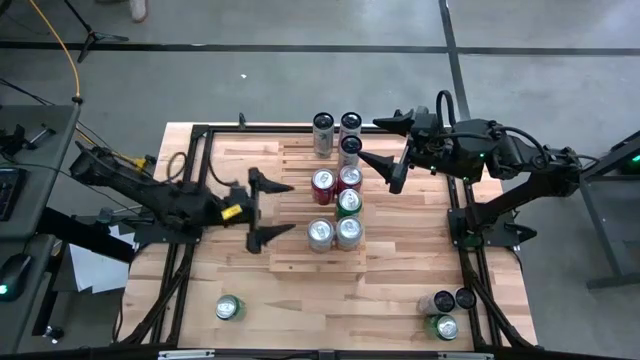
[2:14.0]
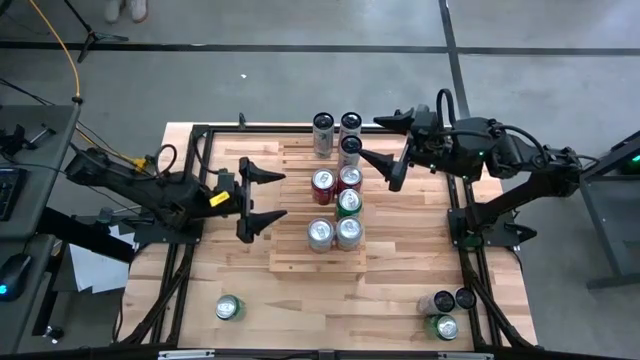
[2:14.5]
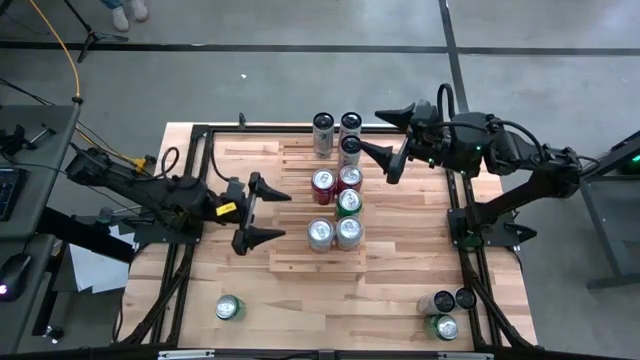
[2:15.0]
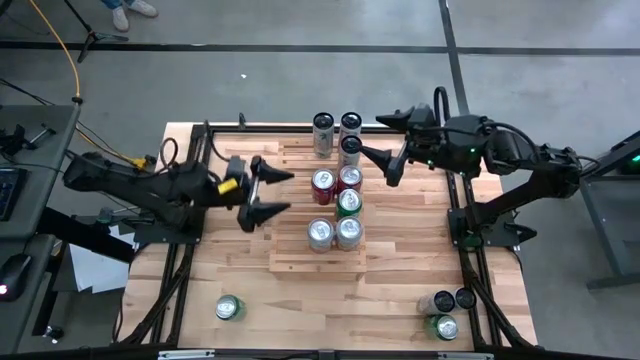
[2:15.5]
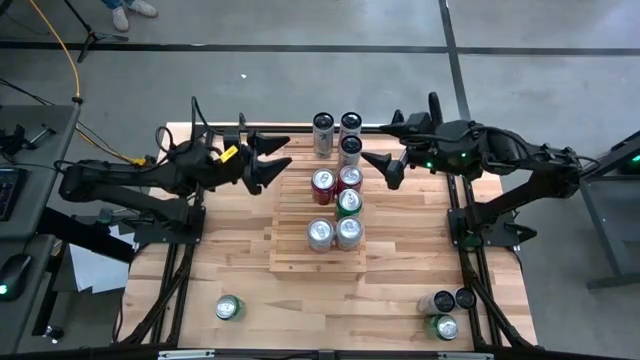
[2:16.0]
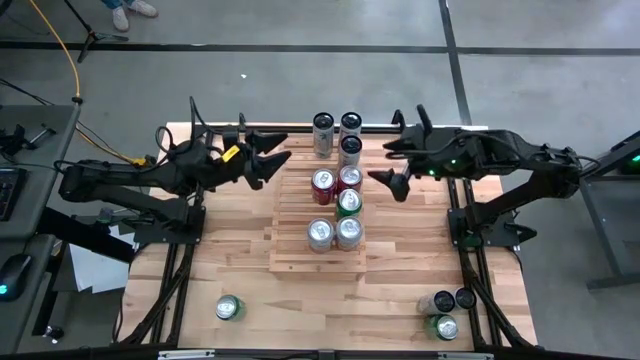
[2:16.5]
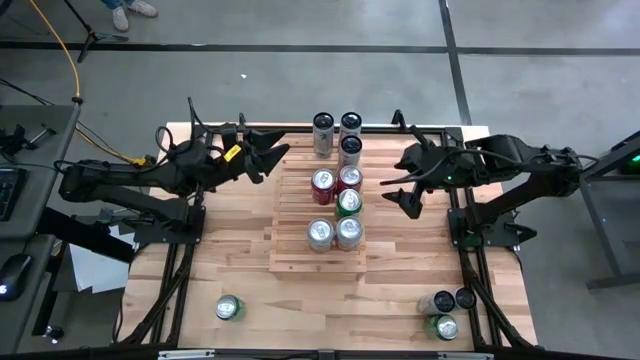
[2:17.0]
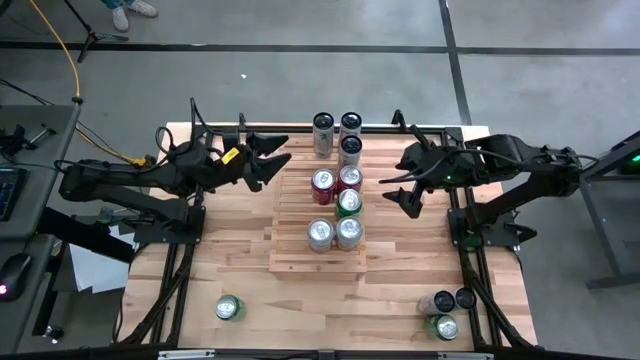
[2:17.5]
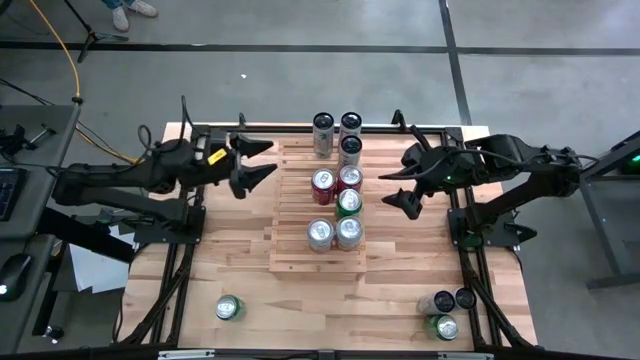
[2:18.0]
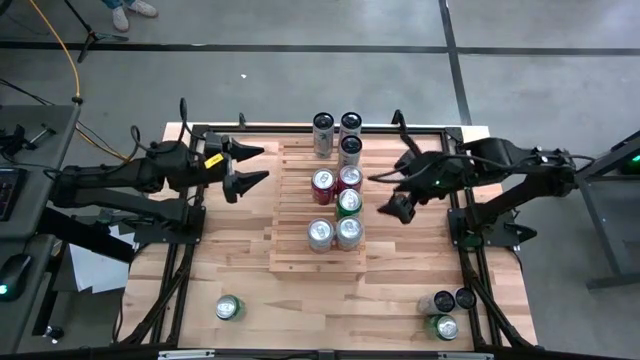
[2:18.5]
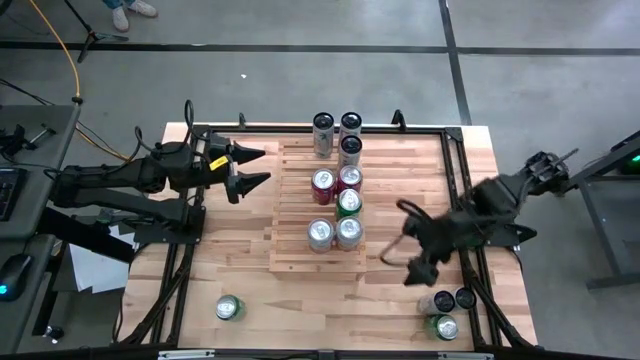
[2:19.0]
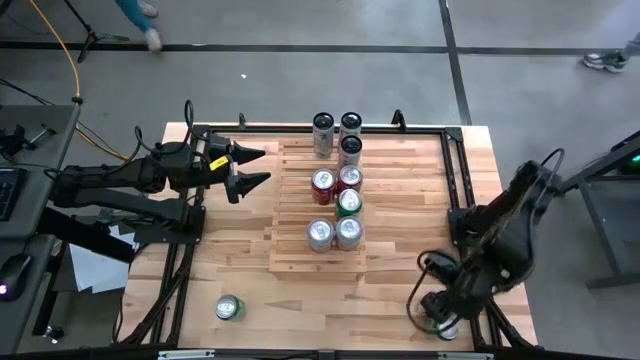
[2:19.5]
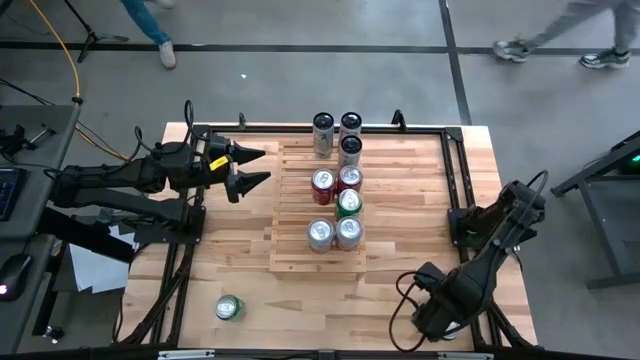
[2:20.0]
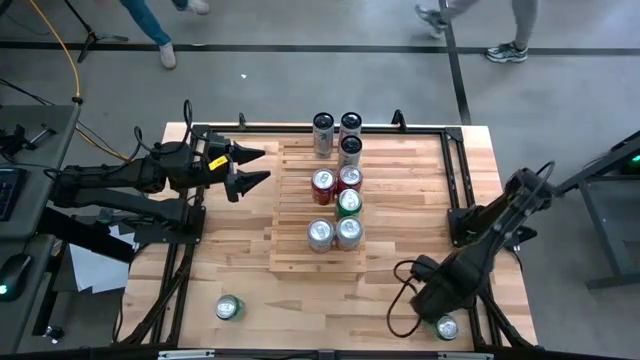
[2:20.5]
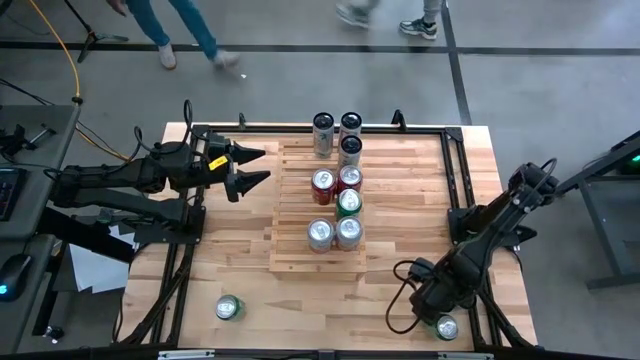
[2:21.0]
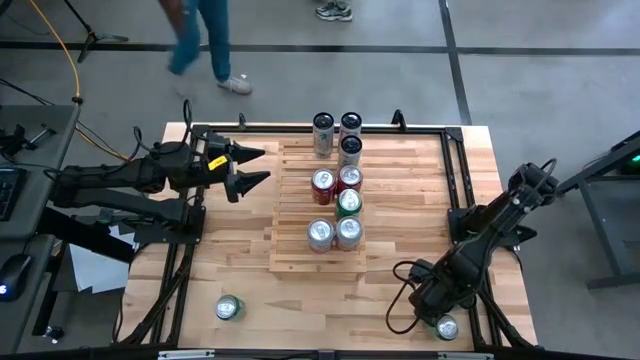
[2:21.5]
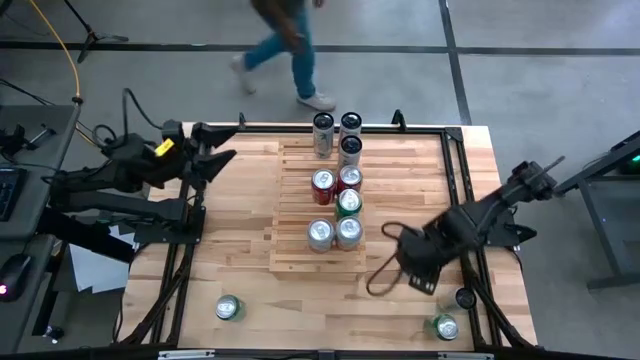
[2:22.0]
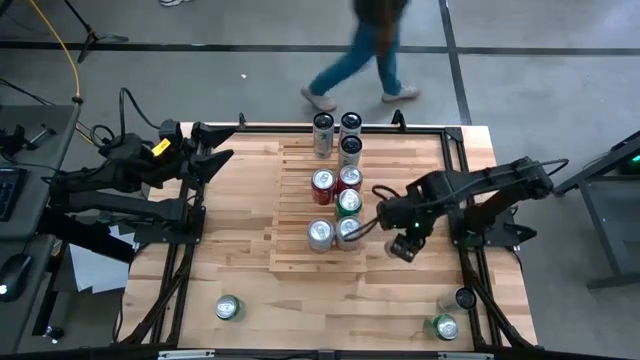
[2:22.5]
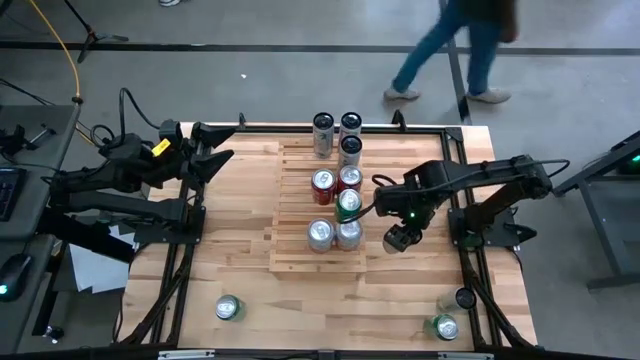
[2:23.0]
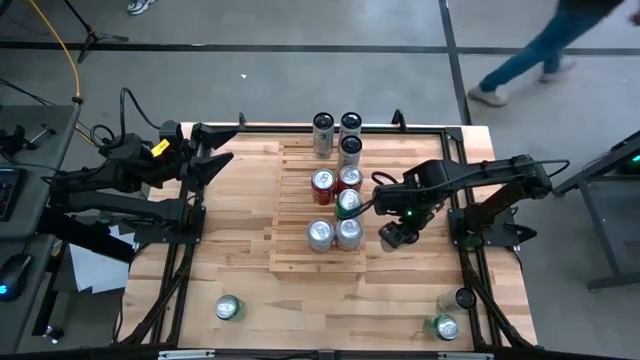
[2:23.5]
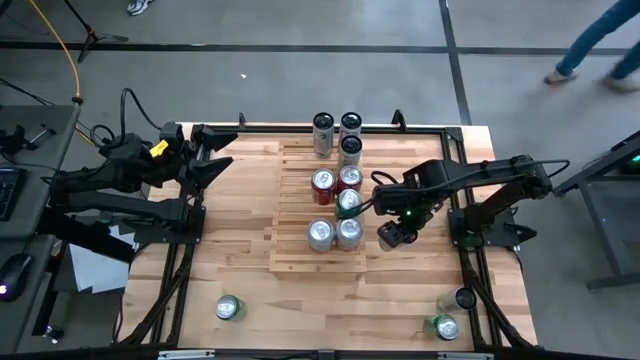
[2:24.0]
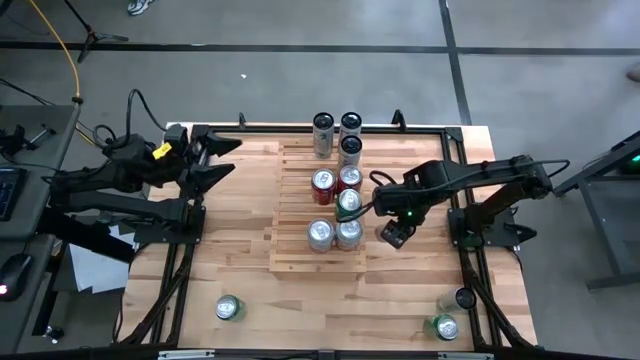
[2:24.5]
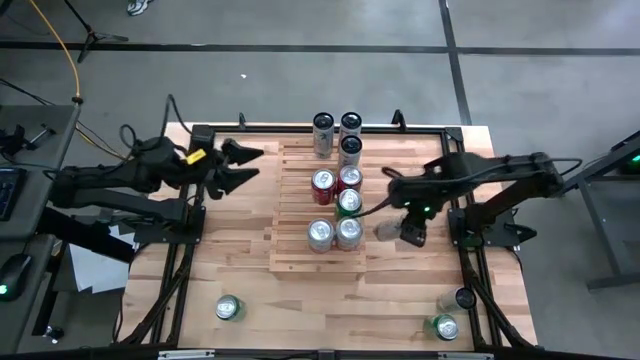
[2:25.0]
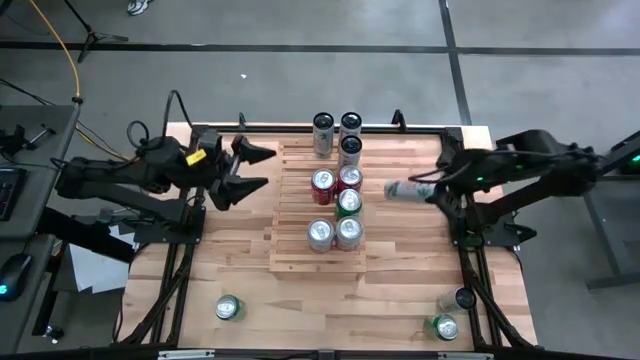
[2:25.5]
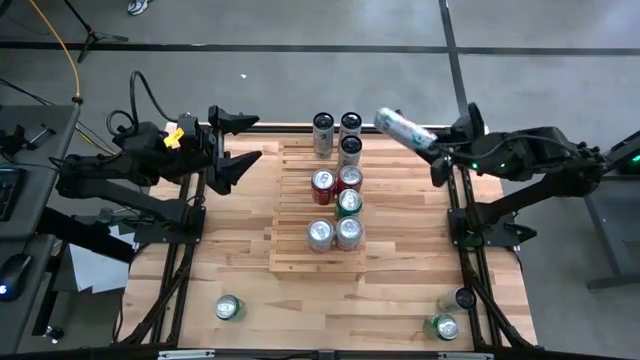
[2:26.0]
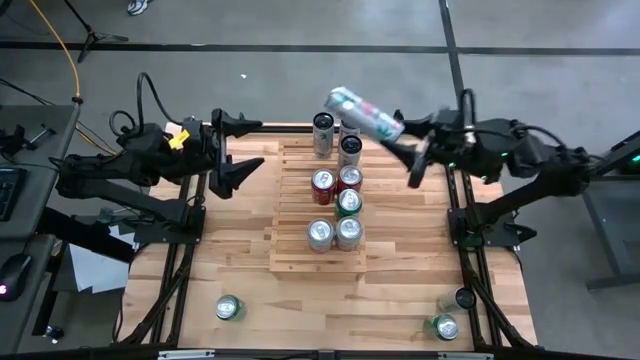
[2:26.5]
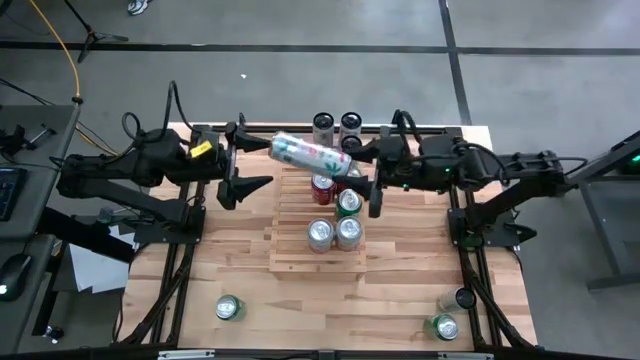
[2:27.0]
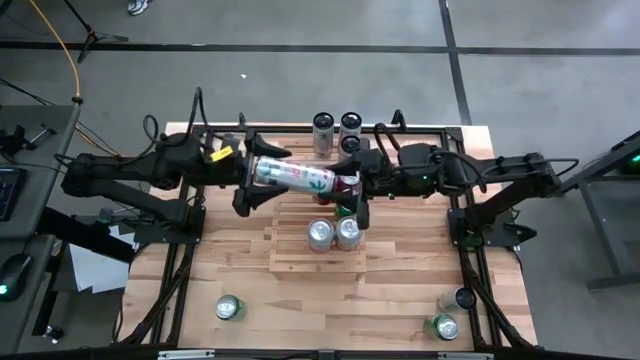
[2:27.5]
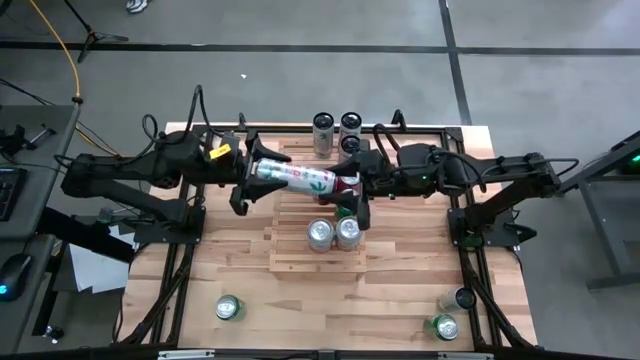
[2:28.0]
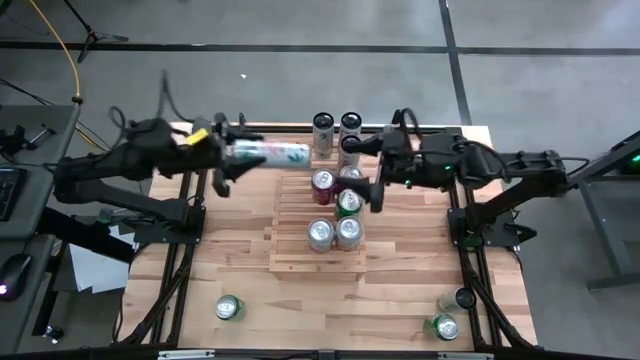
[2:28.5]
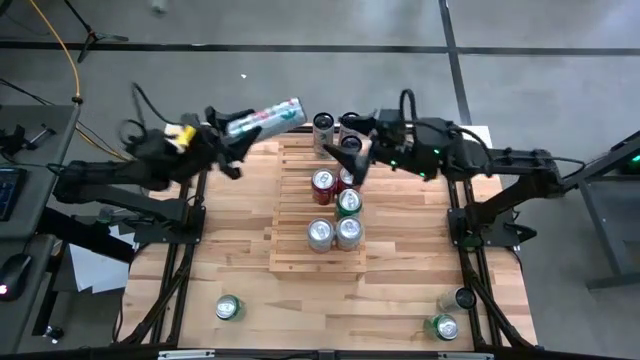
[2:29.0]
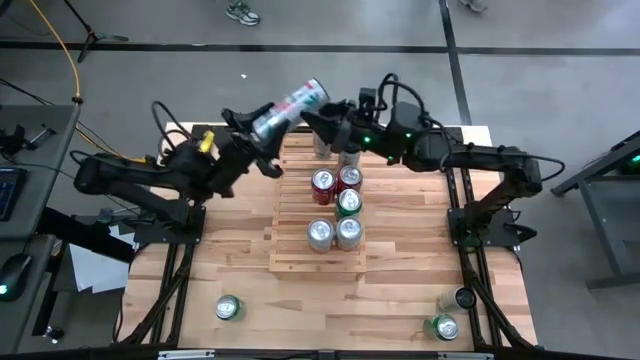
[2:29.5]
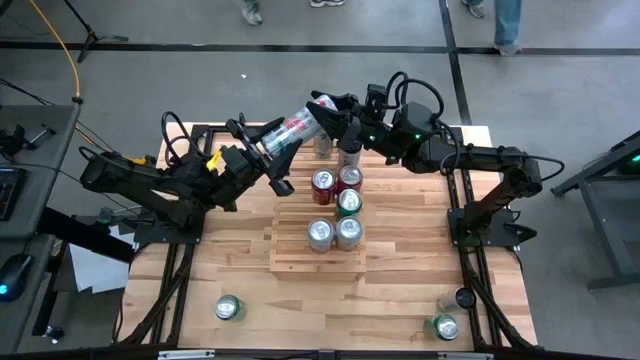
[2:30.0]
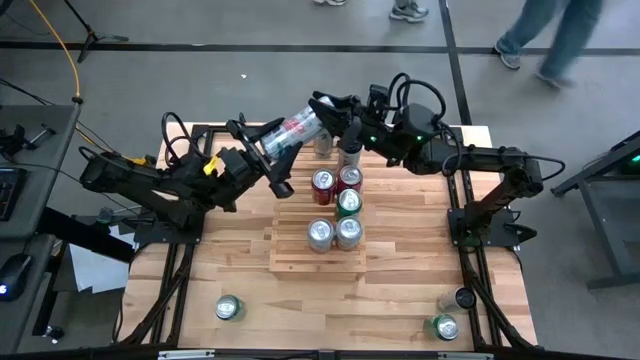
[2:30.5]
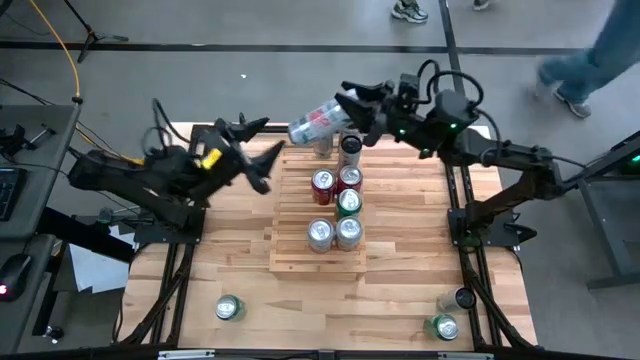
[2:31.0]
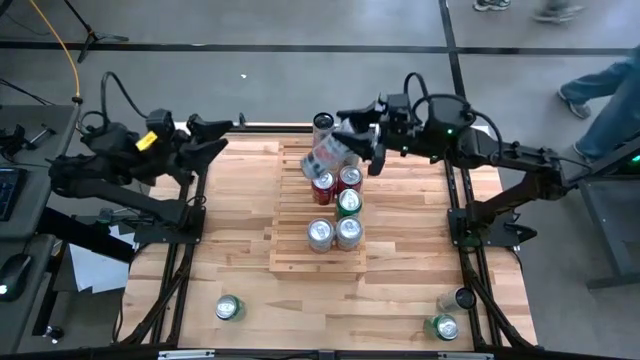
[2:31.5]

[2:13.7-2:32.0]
Task: Place canned beverage on shelf
Put the white pink can on the shelf
